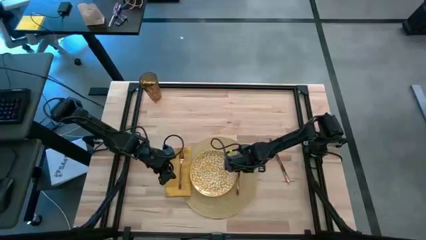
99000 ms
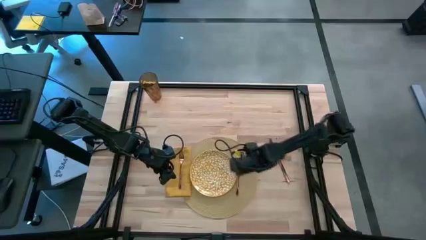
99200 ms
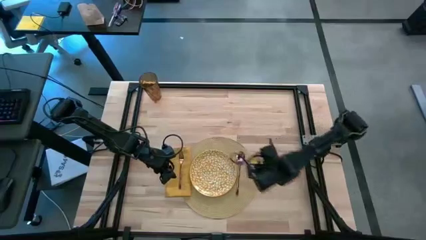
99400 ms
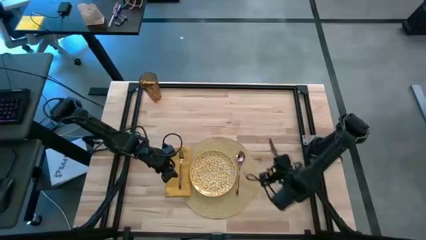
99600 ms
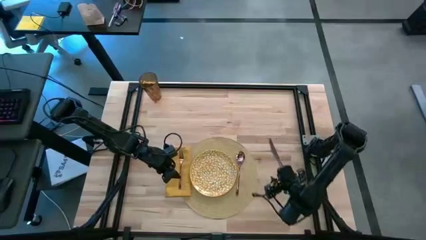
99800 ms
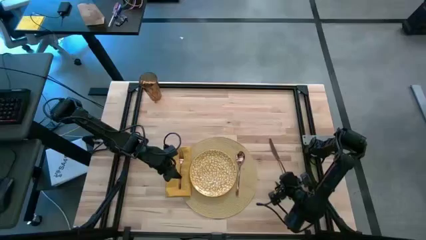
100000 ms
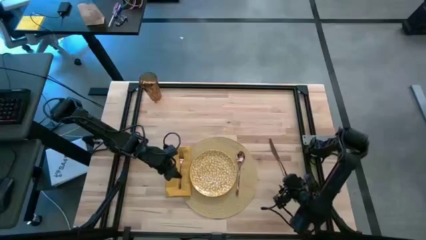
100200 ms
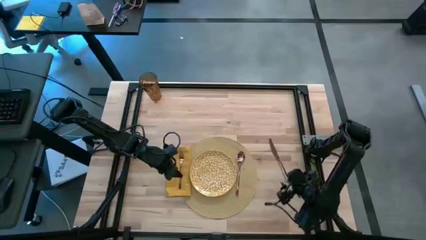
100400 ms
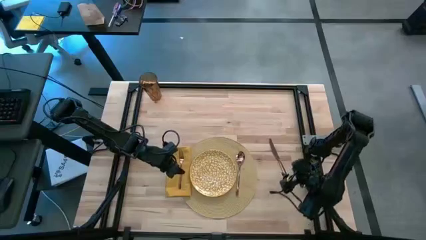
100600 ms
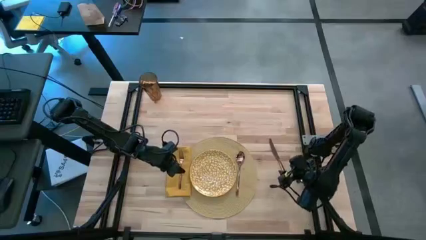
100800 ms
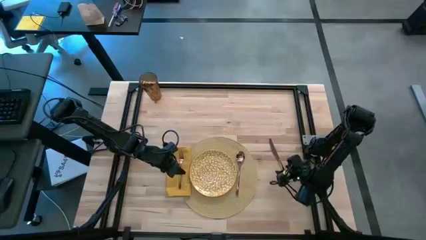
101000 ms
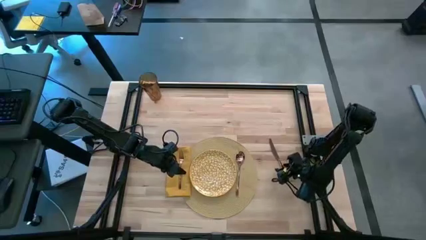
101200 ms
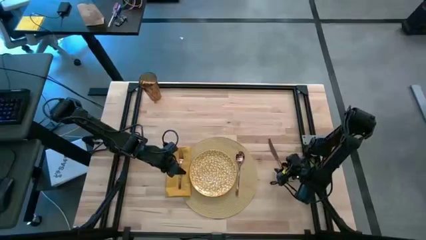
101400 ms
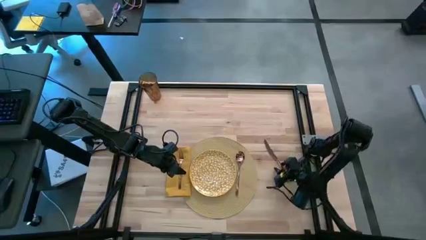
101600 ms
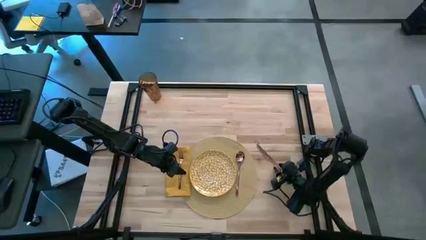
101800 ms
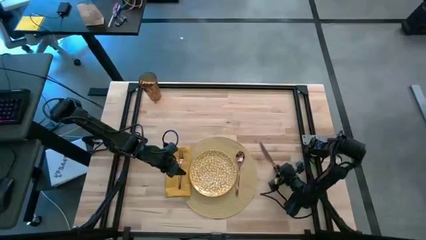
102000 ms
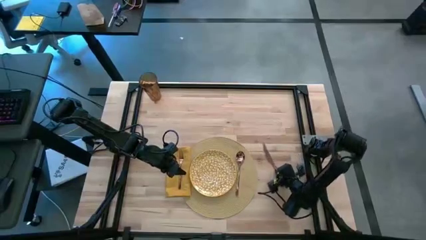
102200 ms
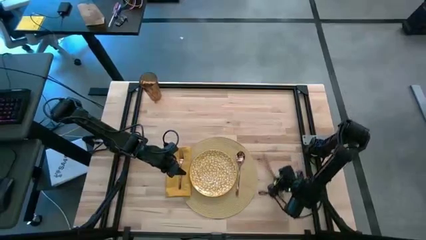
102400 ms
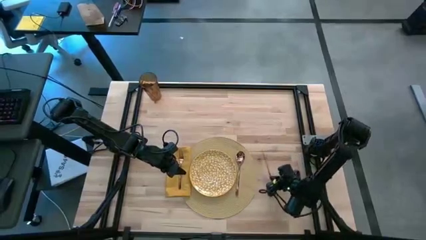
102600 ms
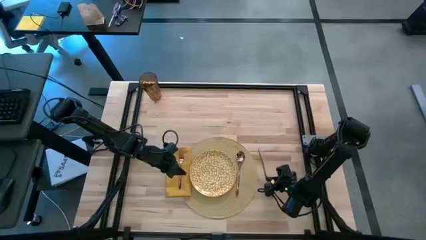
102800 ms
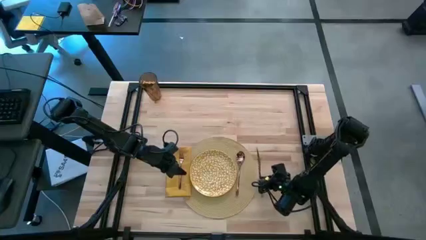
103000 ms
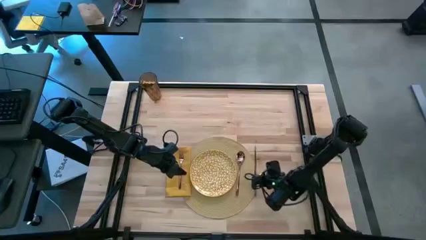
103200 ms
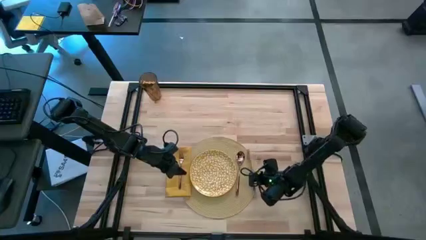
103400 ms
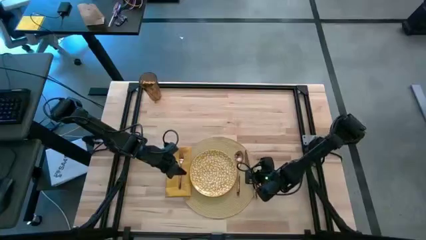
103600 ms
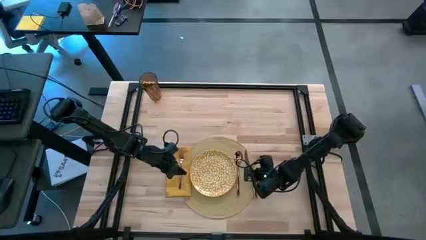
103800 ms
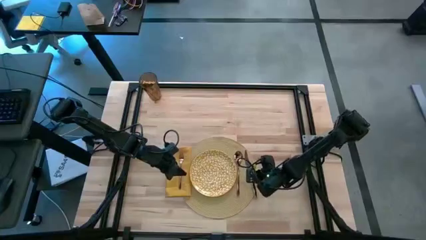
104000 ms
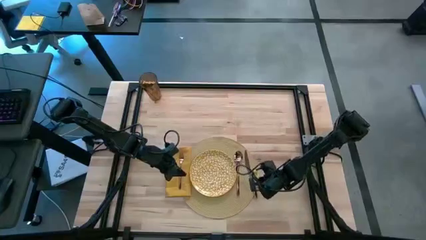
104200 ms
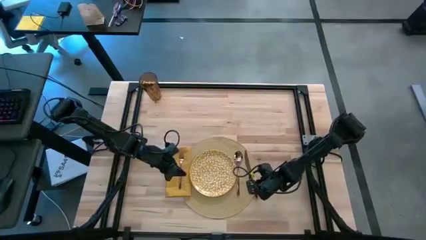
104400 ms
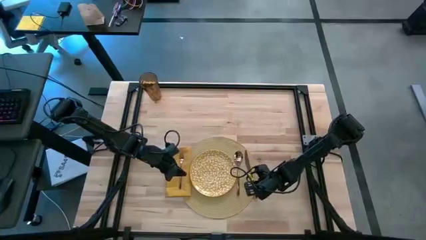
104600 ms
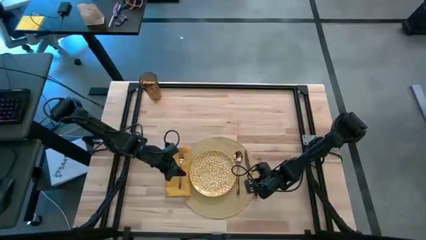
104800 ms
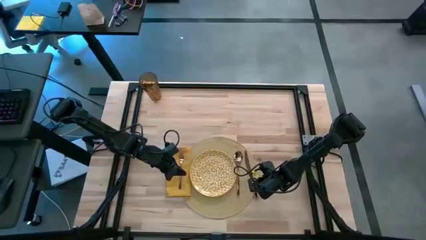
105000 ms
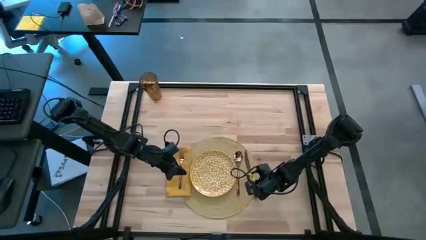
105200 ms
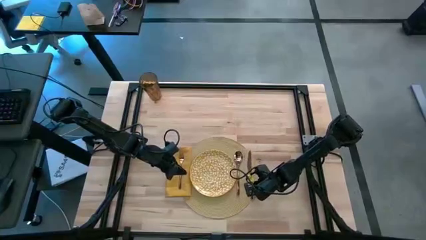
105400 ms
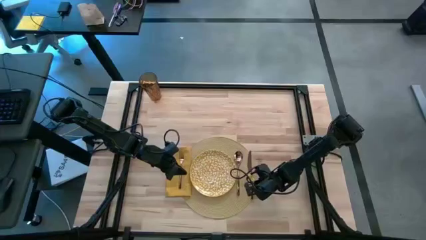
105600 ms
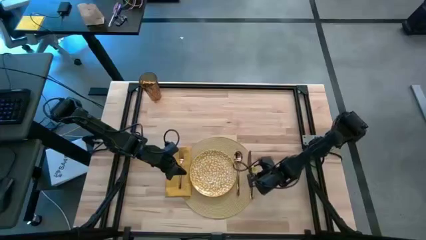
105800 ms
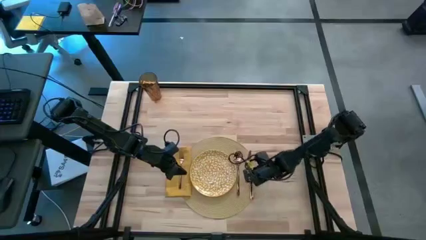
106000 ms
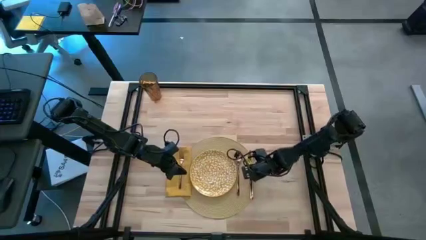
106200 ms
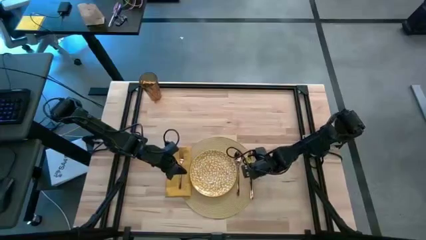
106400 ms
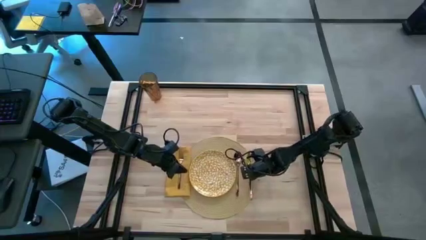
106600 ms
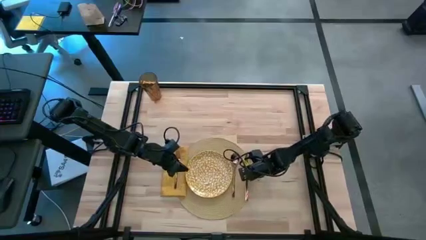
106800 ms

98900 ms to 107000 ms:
Task: Set table place
Put the light brown knife on the tablemat to the right of the light brown spoon

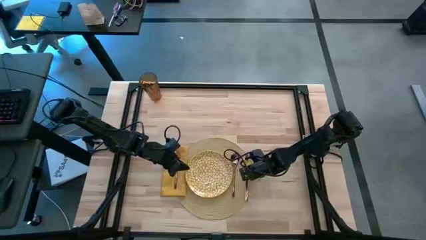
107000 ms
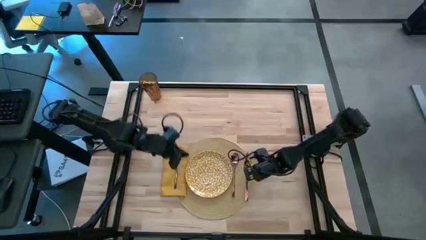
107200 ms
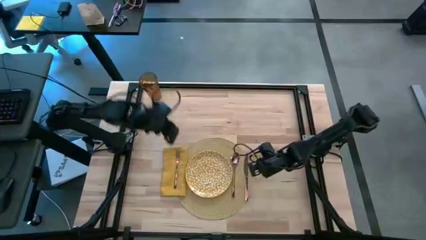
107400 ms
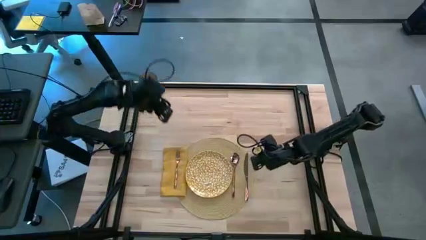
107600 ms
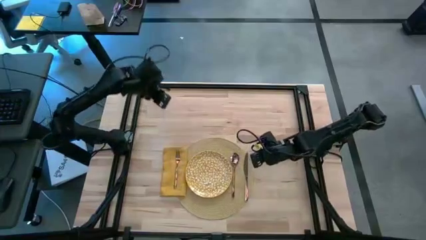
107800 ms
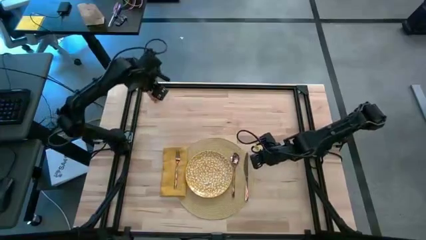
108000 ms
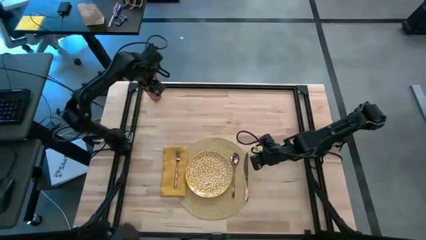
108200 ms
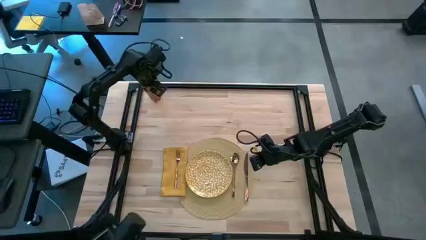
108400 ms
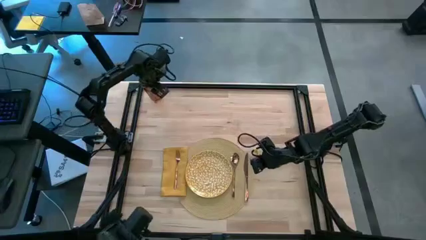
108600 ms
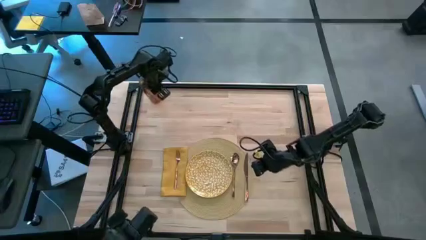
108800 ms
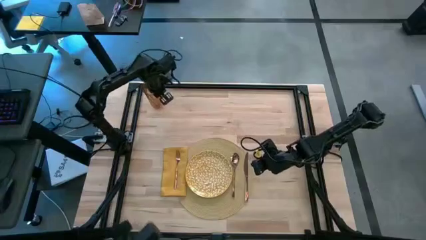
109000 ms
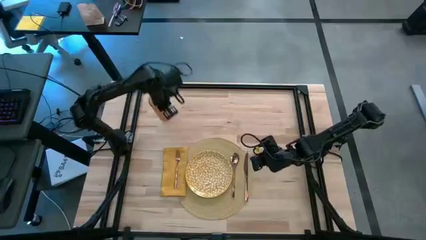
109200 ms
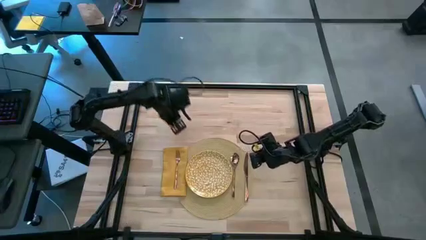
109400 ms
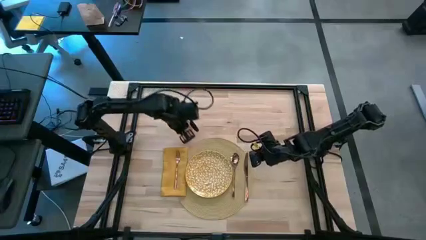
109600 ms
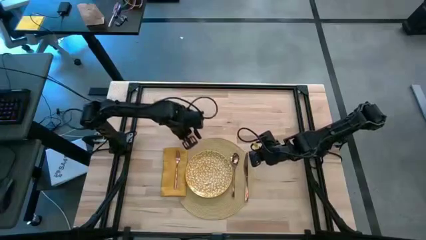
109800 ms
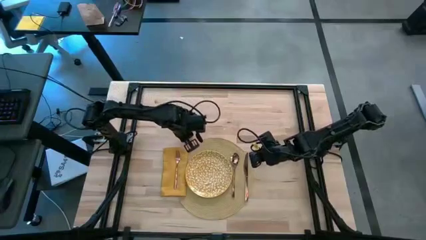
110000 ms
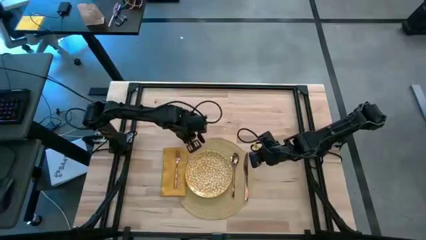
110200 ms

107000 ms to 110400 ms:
Put the brown cup to the top left of the tablemat

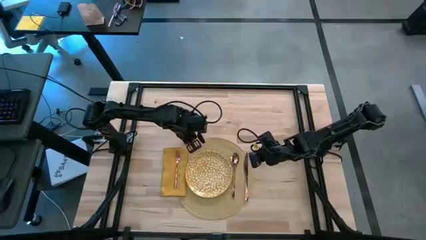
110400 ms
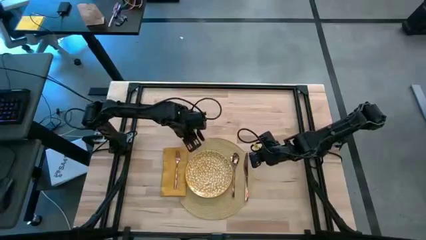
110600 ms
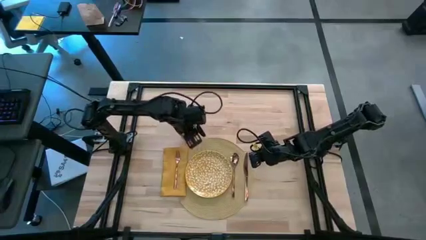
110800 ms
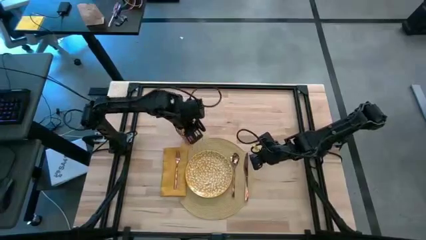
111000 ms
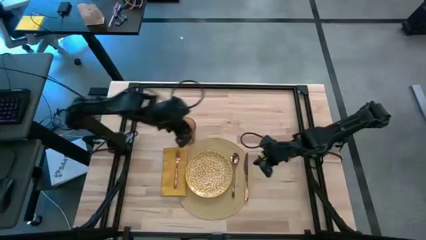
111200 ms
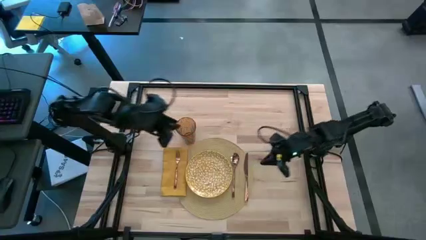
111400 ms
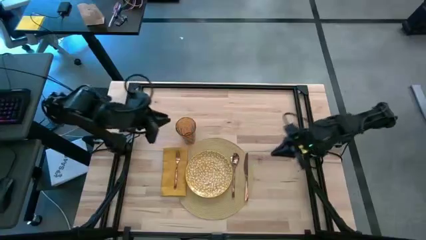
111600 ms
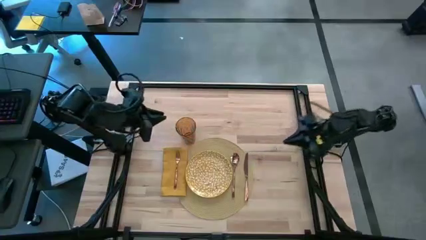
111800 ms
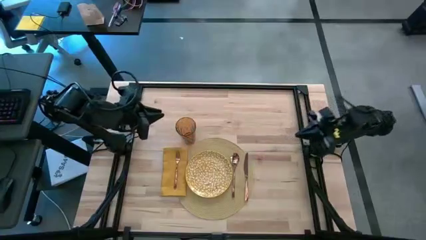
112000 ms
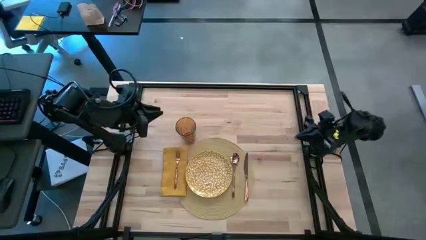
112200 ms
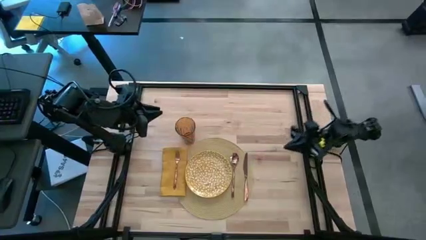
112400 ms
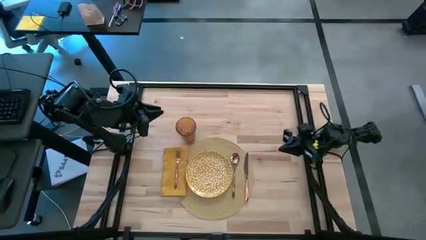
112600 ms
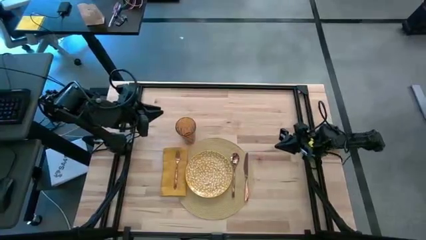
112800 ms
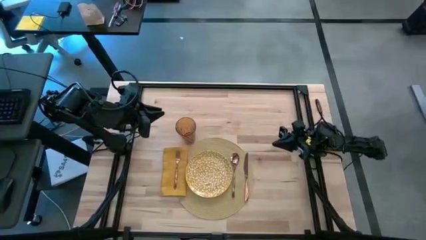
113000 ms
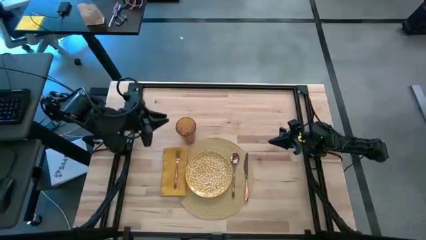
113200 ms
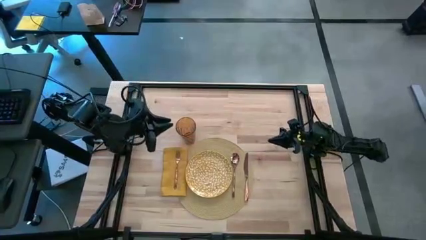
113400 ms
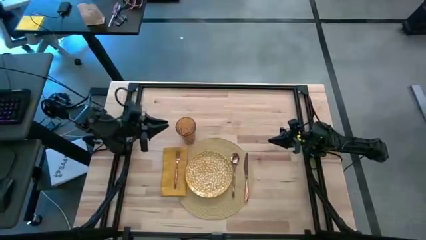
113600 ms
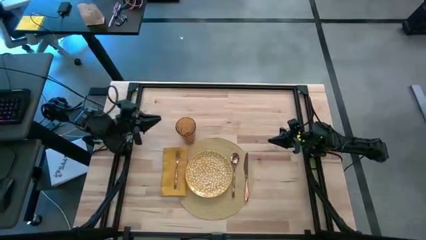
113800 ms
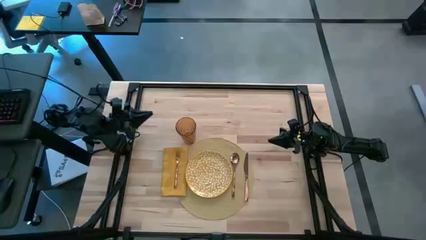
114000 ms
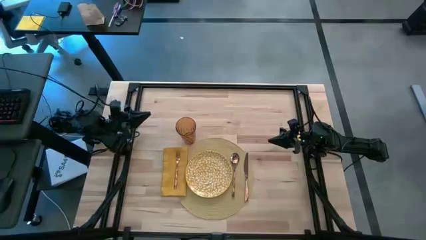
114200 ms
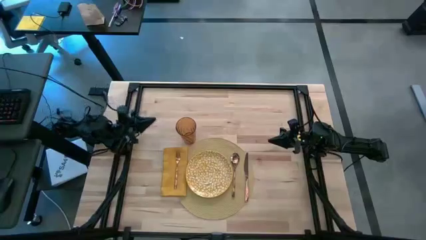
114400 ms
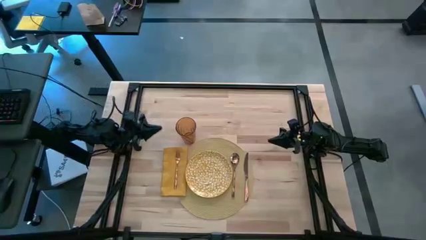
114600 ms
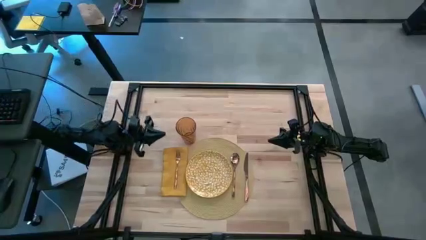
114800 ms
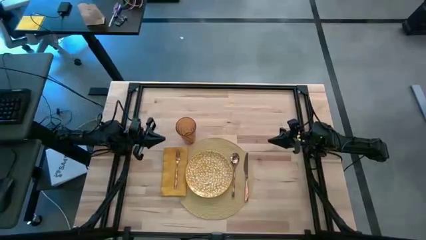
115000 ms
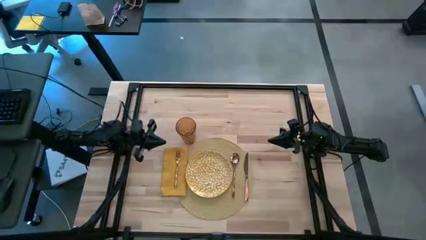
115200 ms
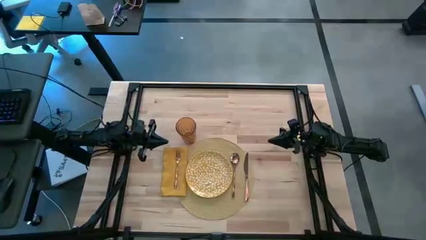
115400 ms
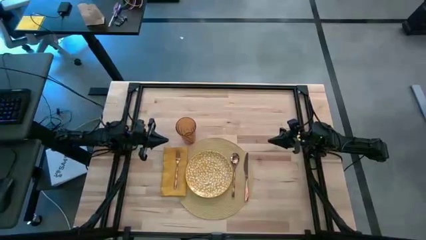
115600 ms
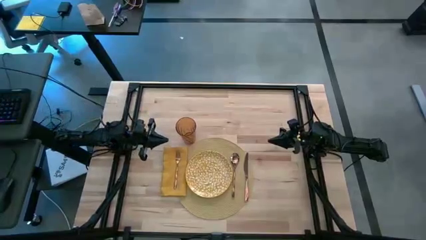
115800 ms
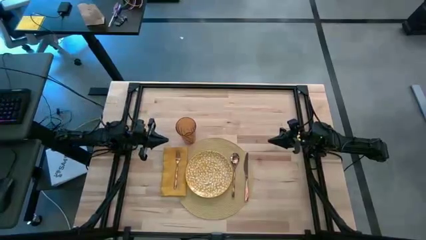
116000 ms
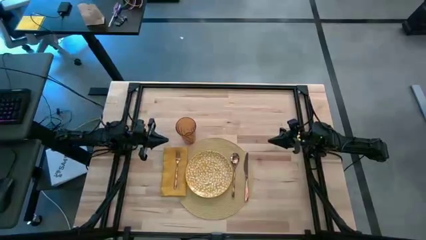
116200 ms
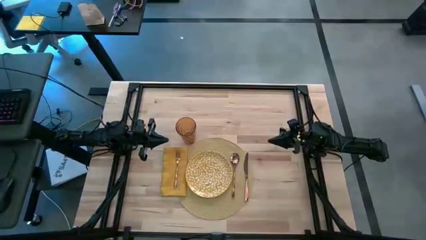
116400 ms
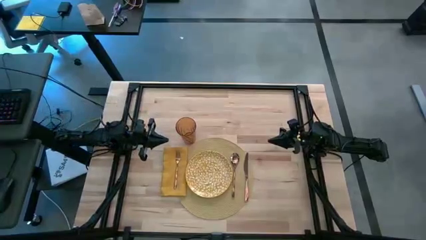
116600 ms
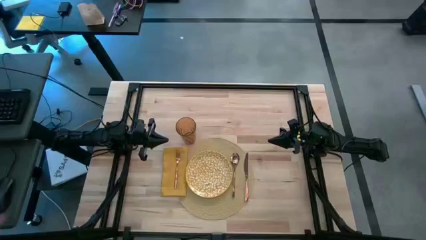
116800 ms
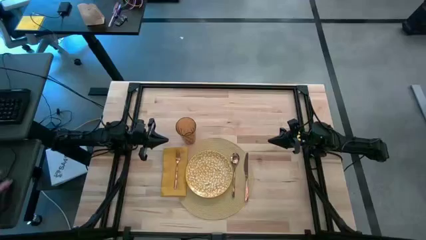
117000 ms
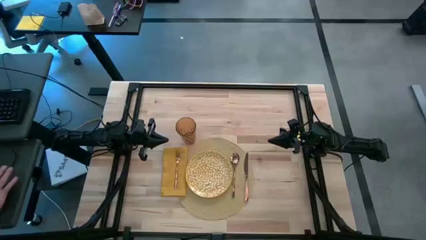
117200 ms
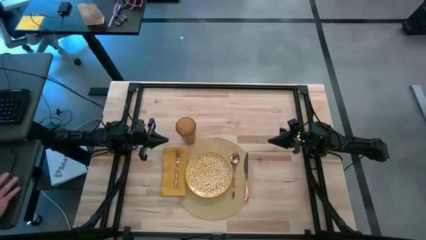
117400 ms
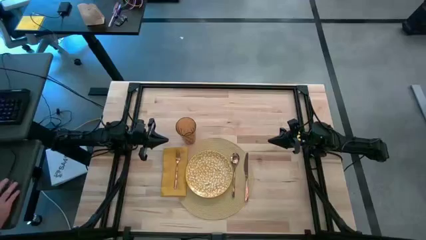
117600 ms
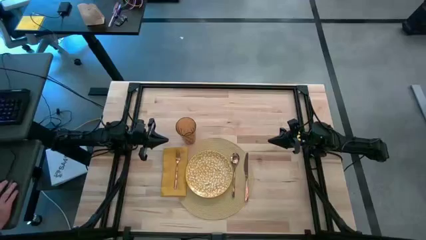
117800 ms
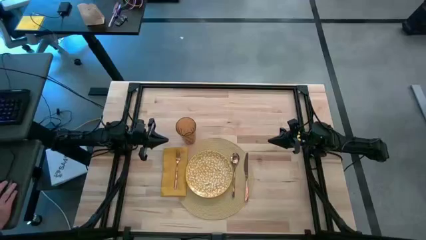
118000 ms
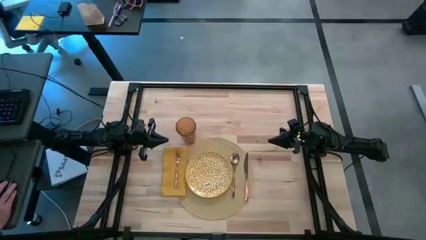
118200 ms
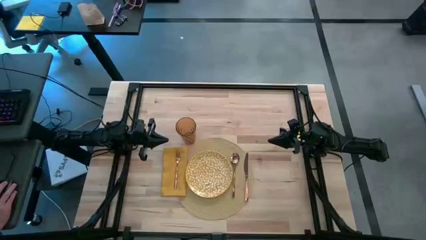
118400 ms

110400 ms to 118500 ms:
Return to Home Position
